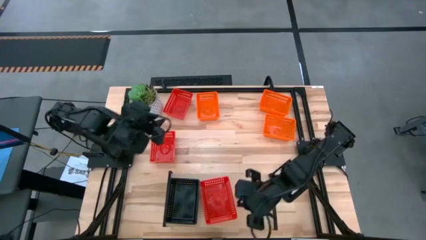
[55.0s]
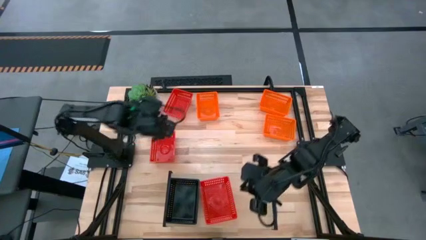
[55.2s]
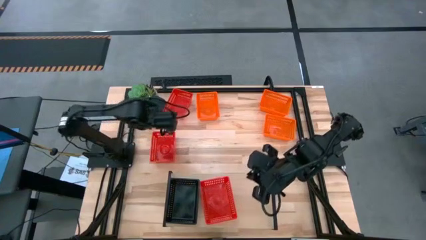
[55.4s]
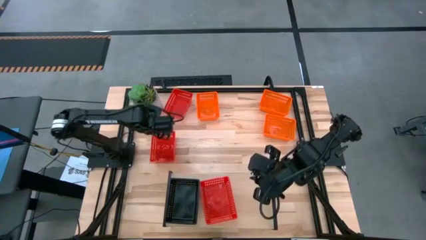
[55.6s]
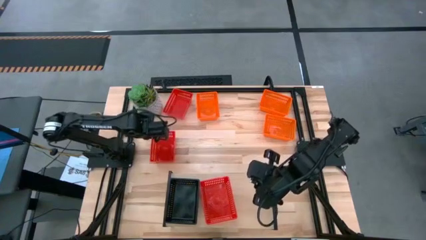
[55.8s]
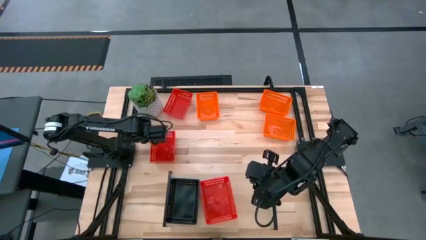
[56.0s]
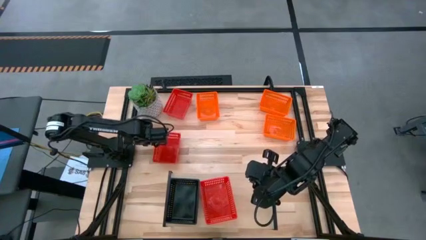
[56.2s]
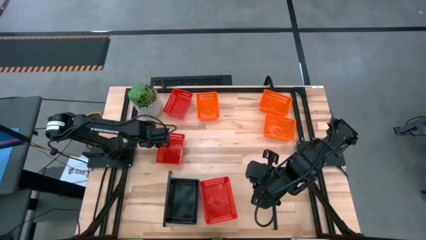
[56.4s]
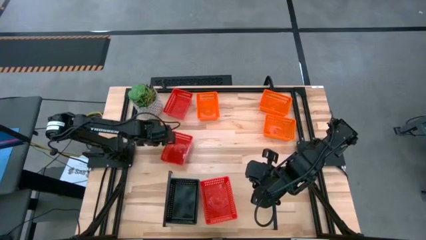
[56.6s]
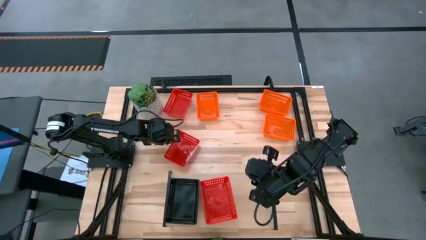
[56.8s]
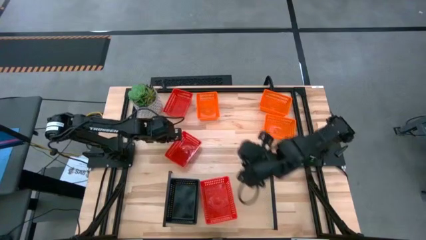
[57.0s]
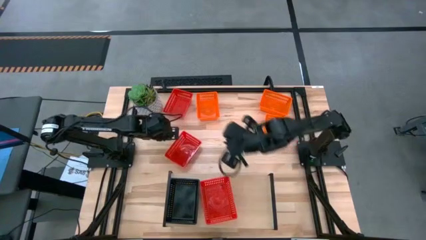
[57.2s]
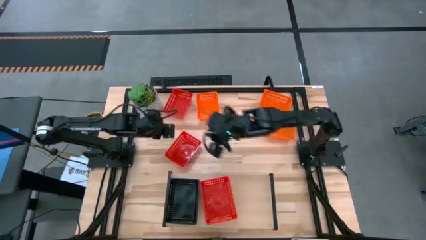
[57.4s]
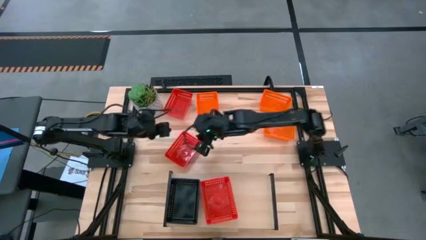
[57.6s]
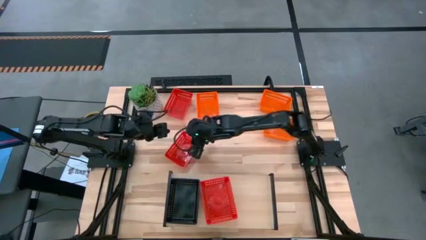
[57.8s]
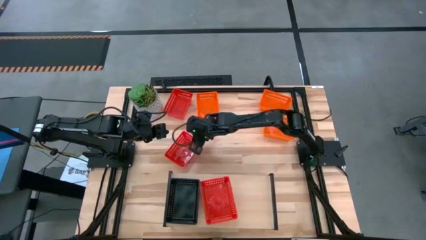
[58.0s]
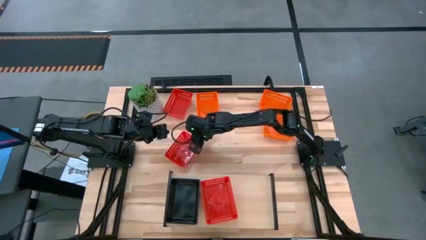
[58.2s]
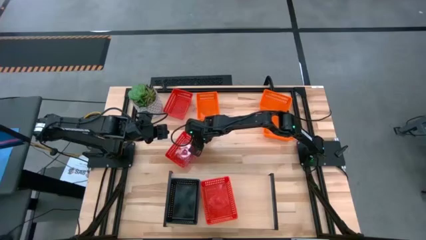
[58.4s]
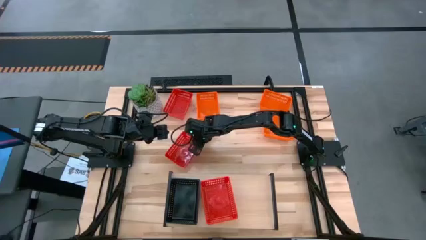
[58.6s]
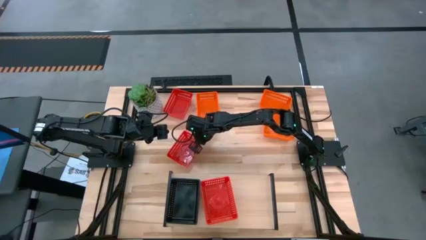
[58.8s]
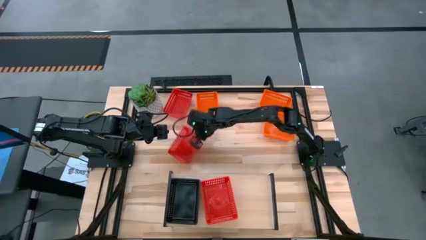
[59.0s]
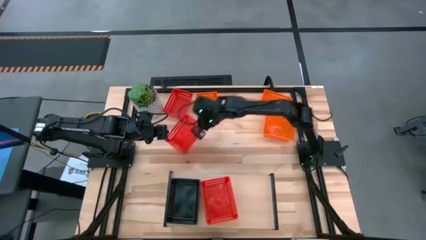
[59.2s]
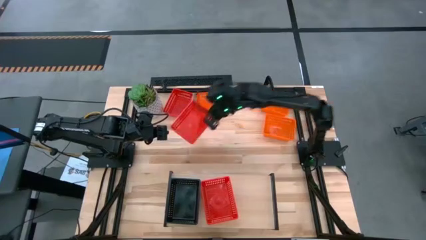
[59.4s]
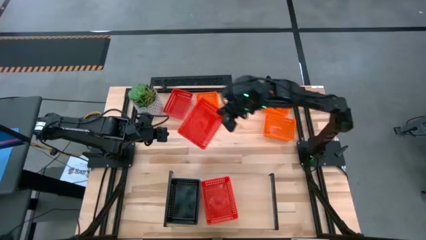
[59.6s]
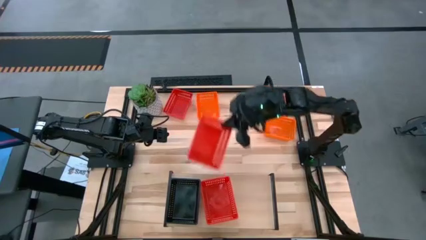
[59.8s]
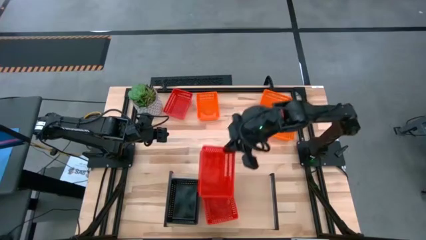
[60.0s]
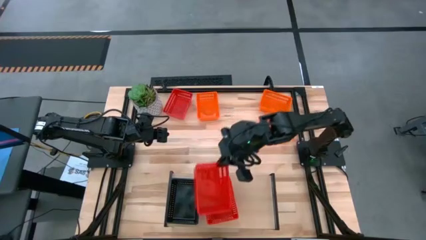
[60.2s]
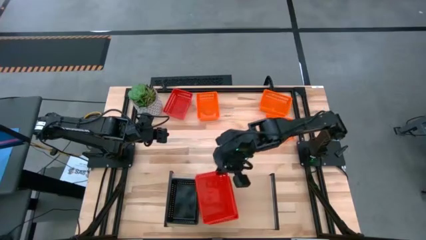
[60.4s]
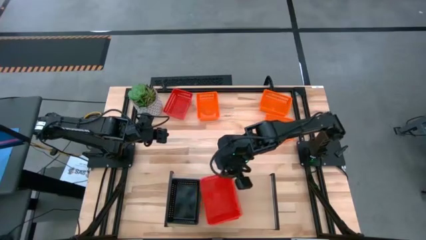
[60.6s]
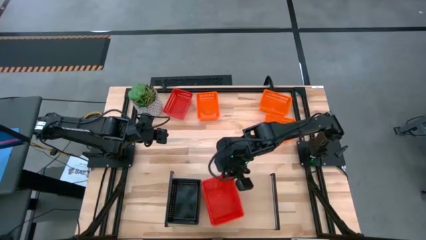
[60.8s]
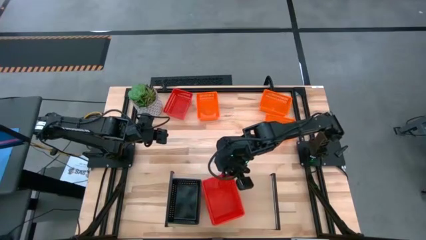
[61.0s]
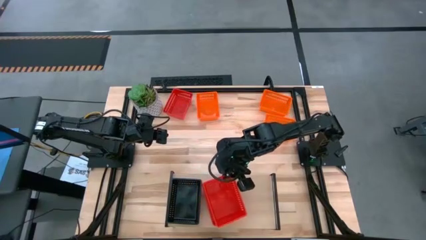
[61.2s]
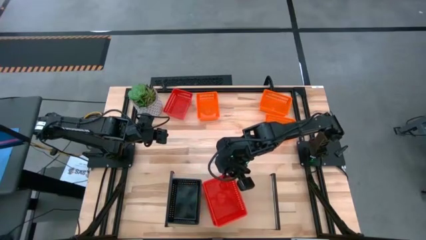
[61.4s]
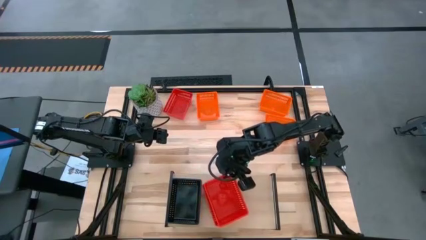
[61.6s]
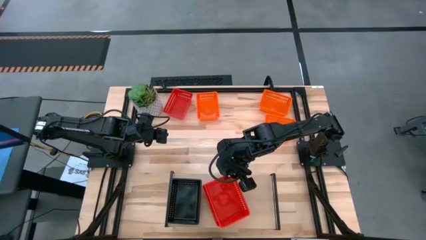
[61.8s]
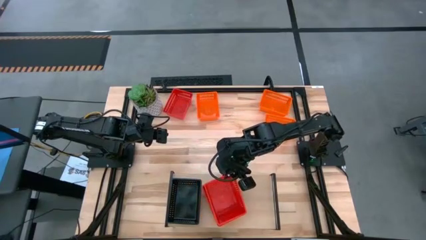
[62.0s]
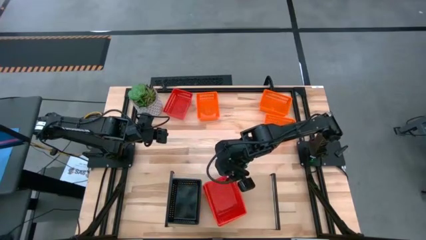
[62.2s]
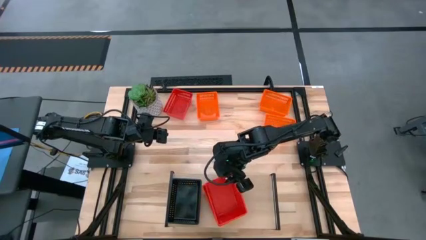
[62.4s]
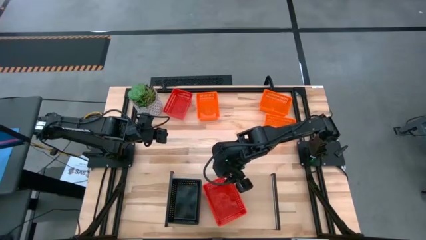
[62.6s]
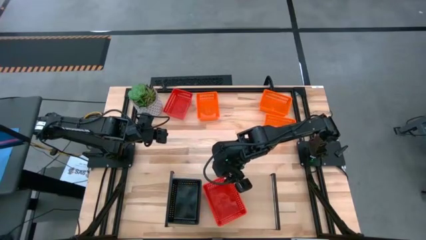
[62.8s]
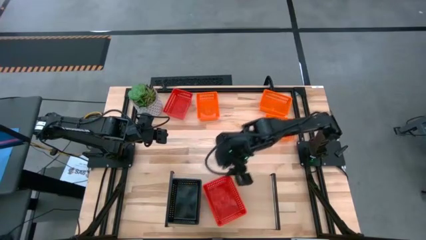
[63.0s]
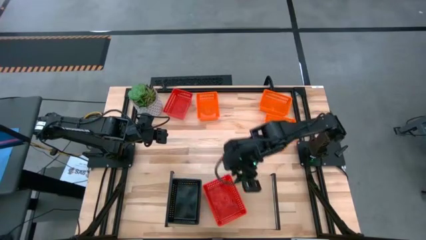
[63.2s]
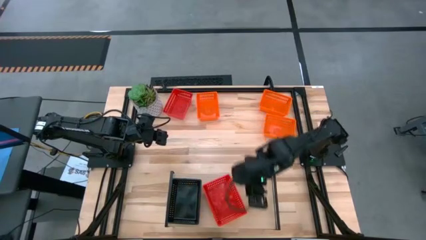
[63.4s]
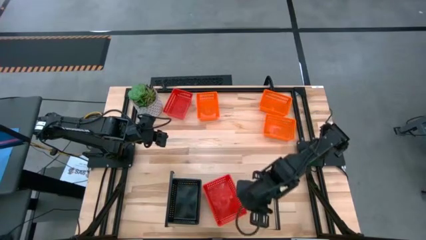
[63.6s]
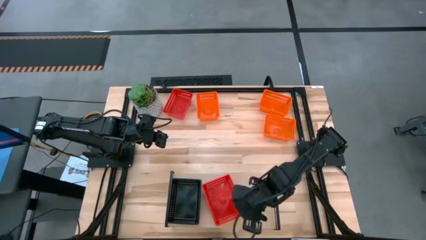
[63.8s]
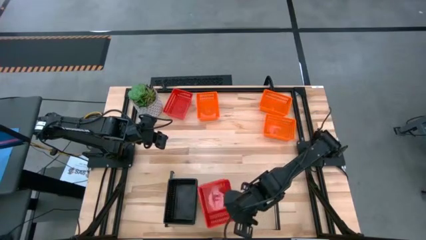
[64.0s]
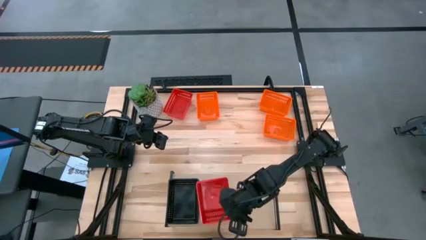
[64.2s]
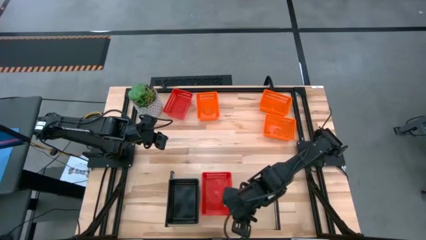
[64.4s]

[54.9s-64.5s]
Task: Stack baskets on shelf by color
Stack the bottom red bin on the top of the red bin on the shelf

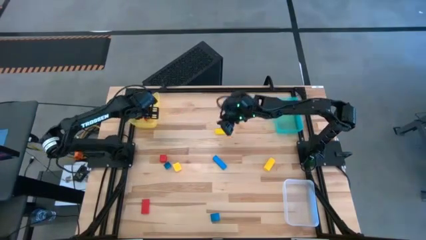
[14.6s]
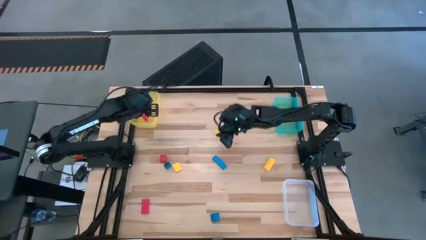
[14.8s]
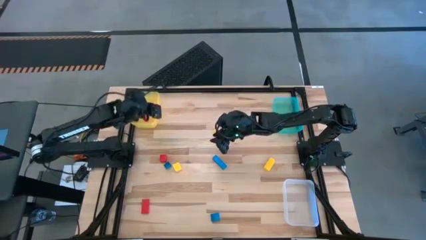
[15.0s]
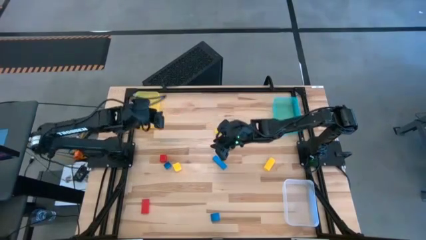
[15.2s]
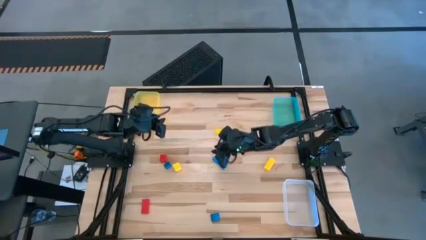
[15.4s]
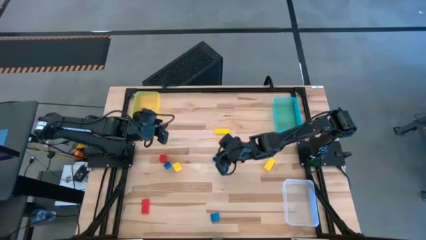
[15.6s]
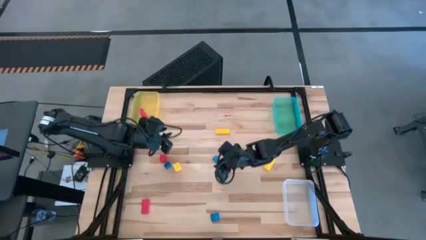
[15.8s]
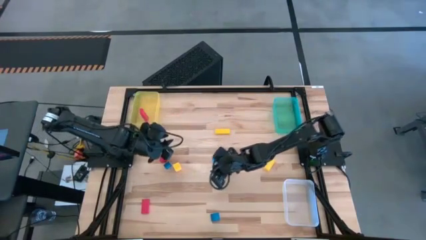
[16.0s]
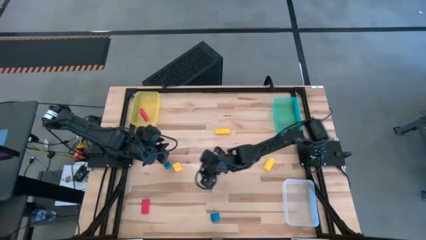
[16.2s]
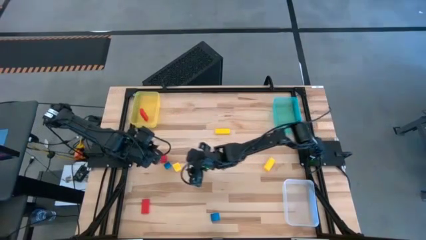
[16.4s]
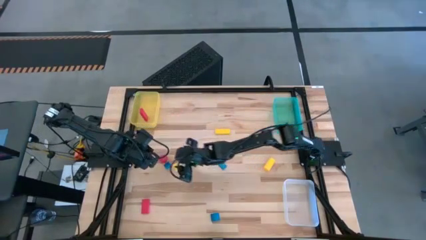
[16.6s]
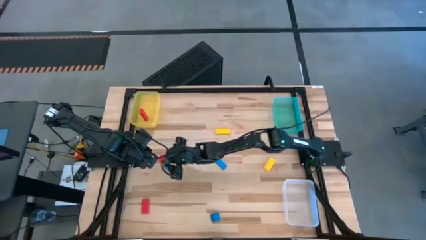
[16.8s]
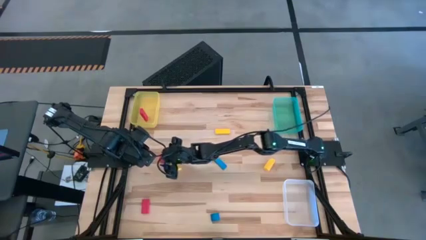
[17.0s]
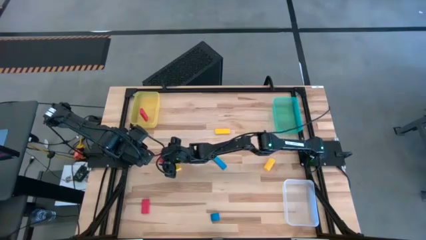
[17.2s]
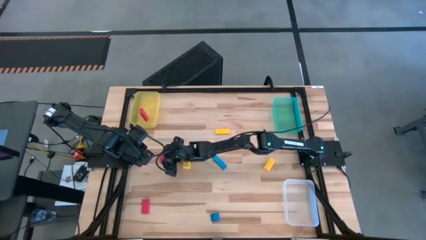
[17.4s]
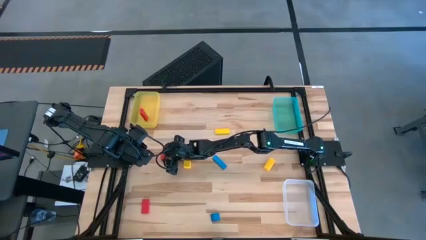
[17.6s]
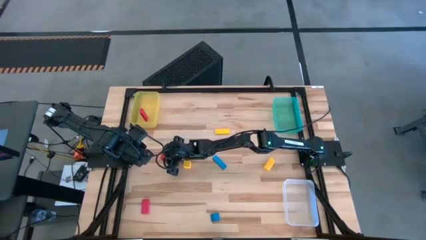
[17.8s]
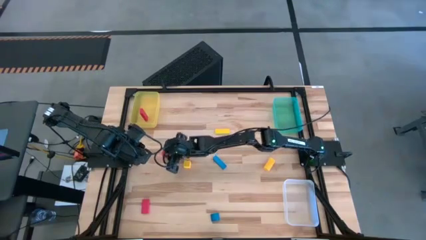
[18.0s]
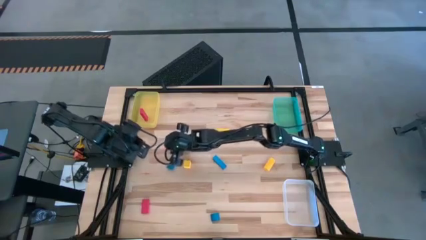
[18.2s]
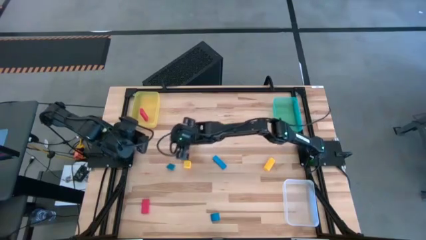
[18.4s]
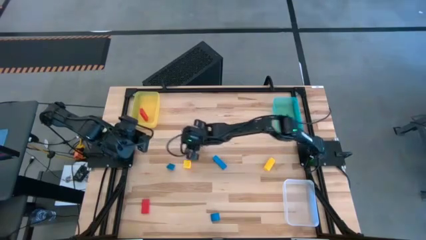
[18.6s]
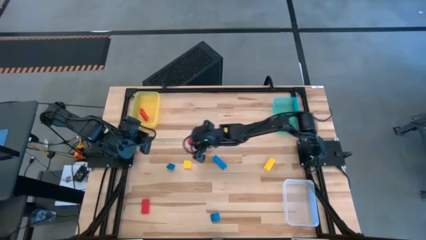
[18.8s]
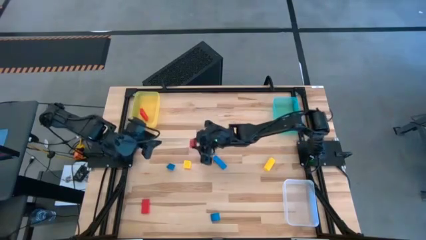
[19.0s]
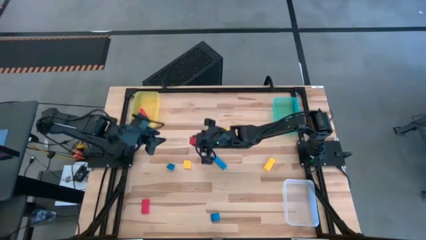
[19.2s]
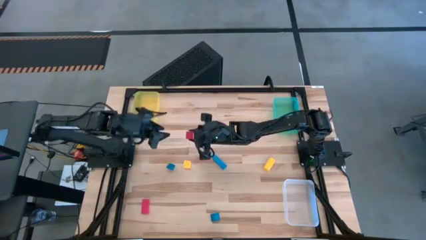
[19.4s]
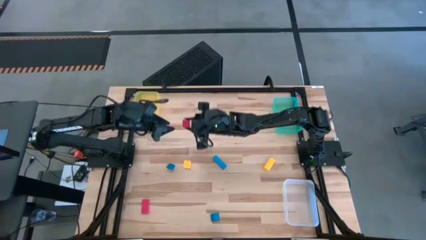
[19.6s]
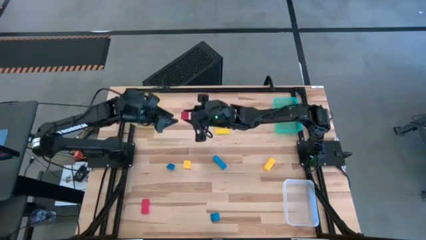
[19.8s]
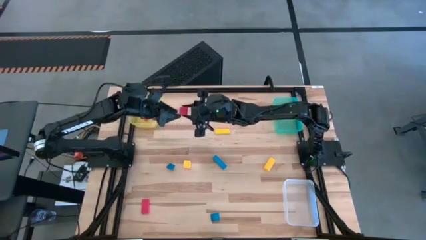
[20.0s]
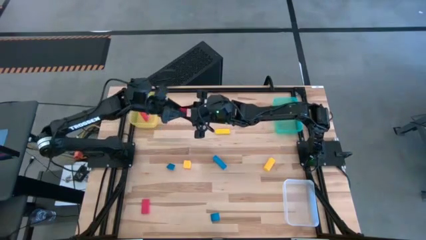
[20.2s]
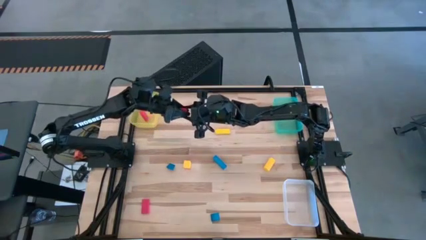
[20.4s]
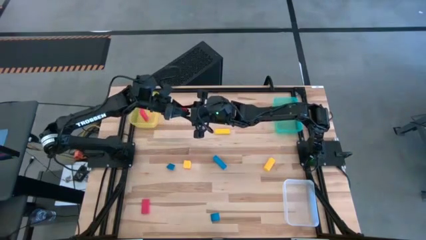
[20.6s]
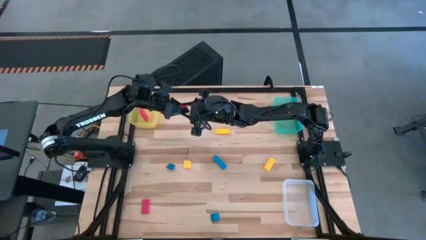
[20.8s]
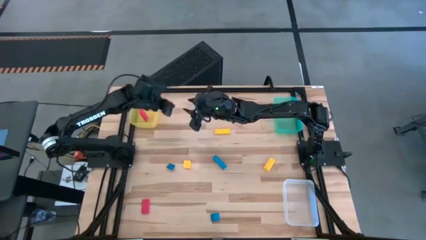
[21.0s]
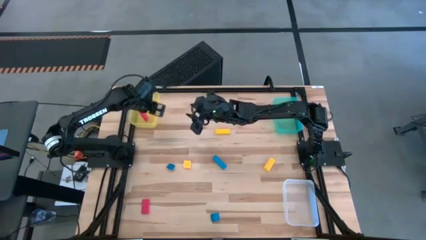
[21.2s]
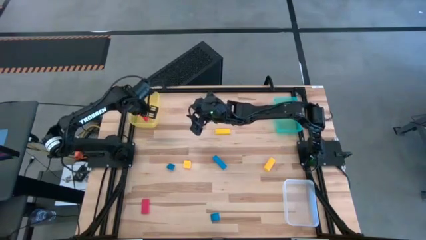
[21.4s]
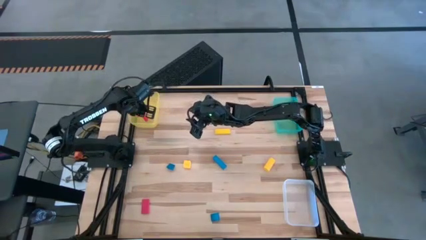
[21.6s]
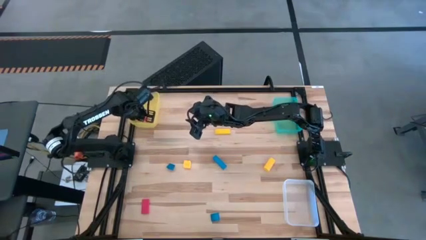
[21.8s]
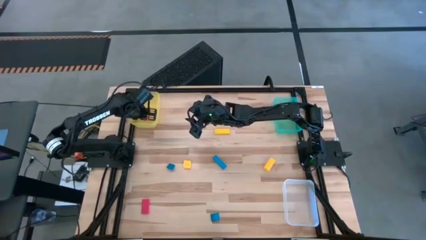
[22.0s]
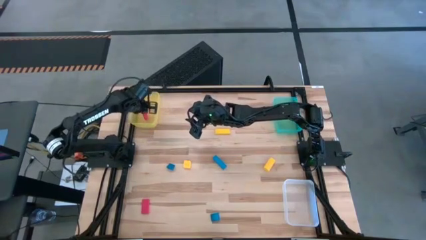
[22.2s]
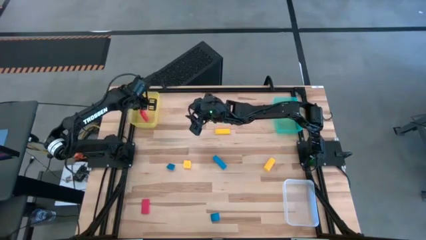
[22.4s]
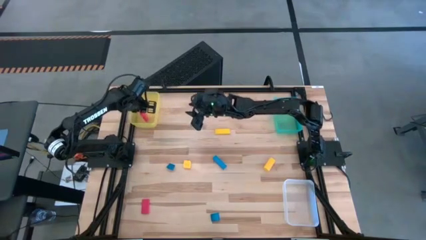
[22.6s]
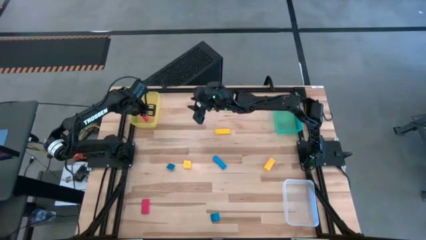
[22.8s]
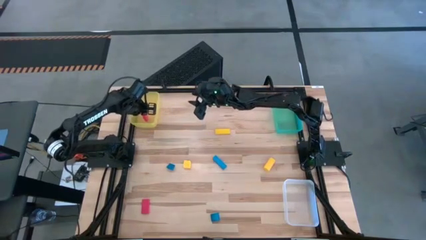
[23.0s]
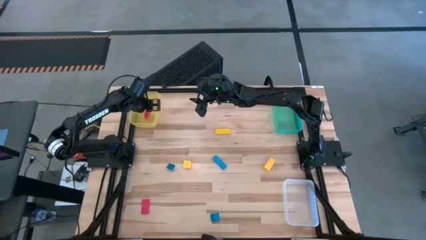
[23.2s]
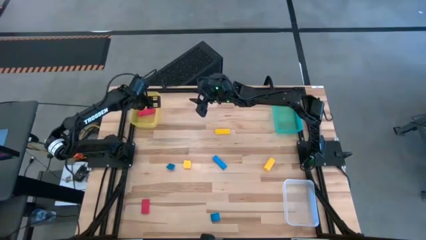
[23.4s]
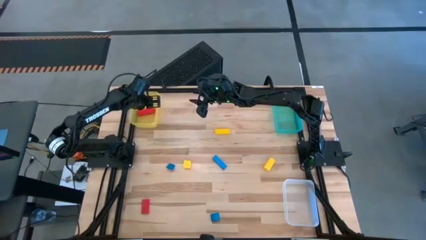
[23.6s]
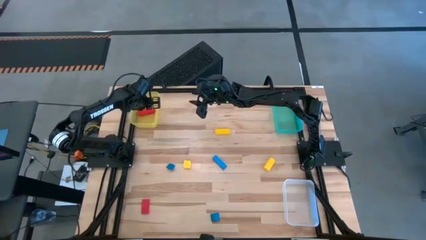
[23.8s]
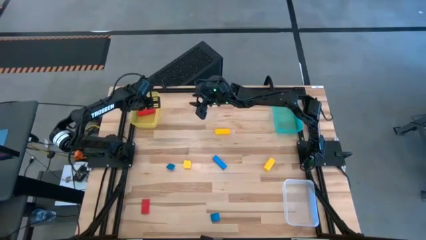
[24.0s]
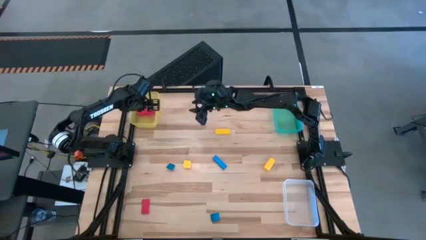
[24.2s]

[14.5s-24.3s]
Task: Sort & place blocks by color
Put the top red block into the yellow bin
